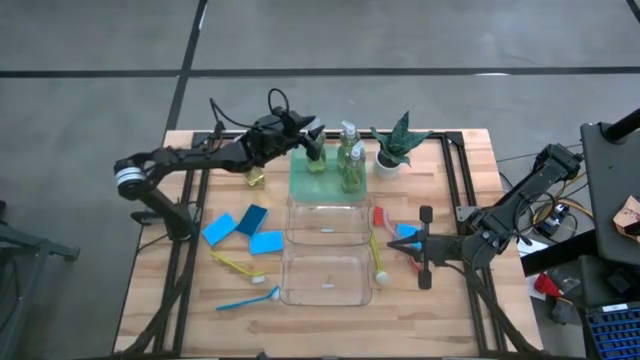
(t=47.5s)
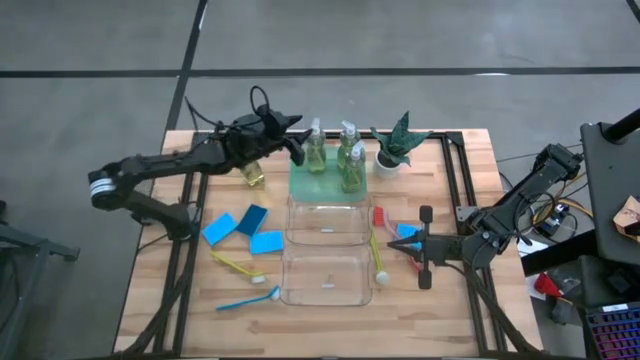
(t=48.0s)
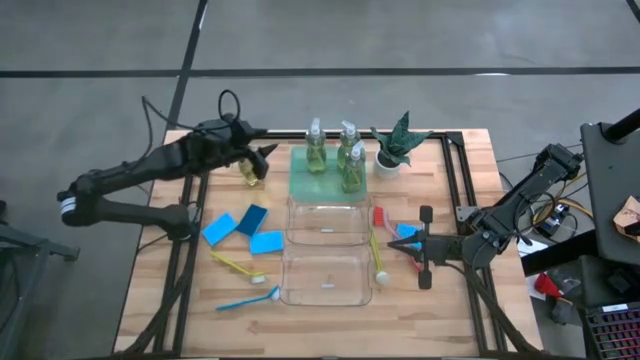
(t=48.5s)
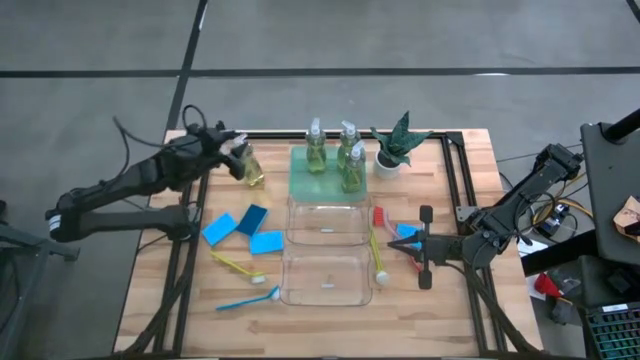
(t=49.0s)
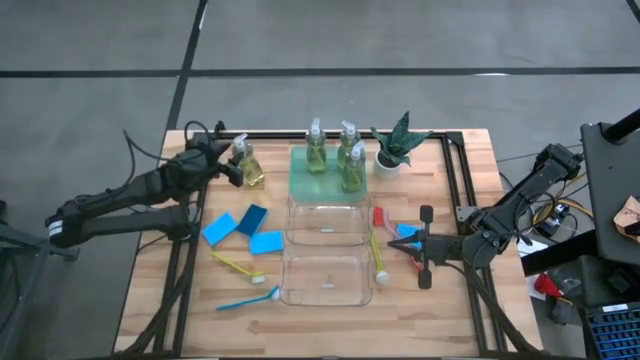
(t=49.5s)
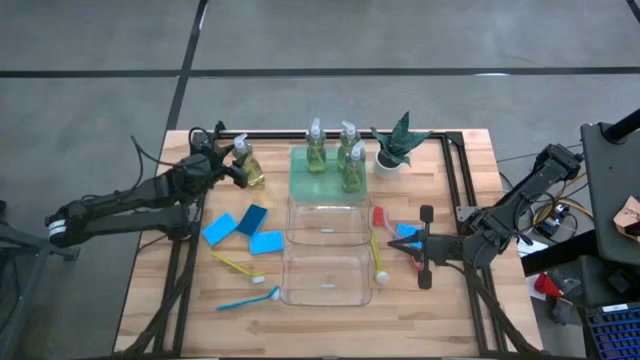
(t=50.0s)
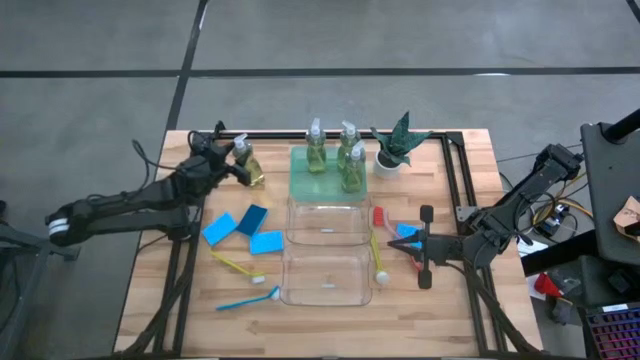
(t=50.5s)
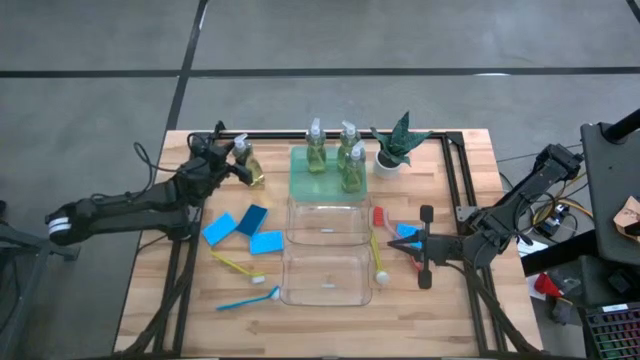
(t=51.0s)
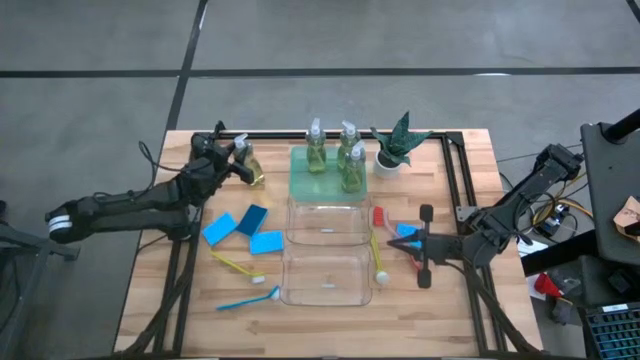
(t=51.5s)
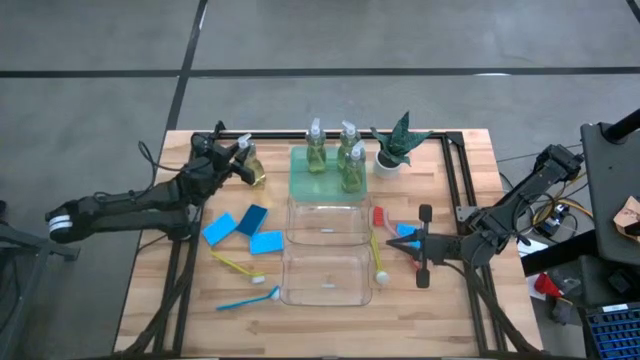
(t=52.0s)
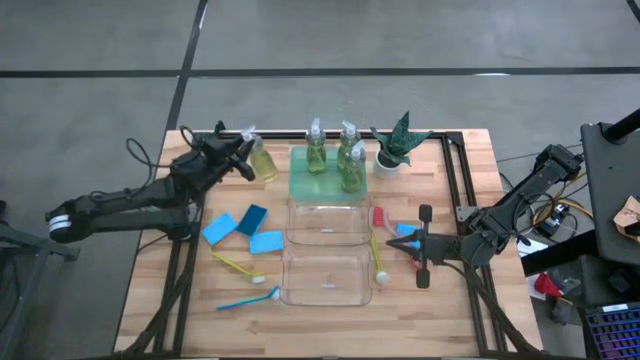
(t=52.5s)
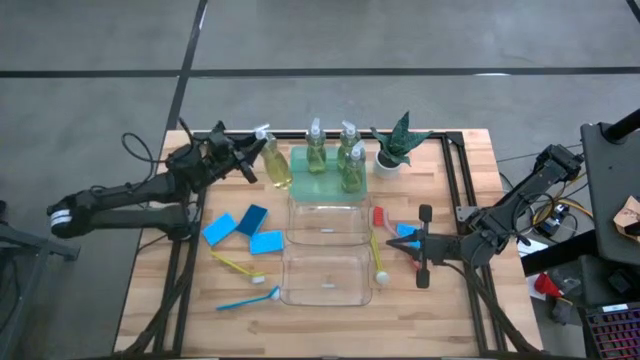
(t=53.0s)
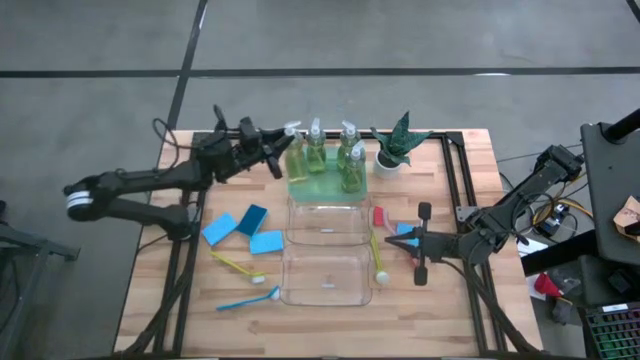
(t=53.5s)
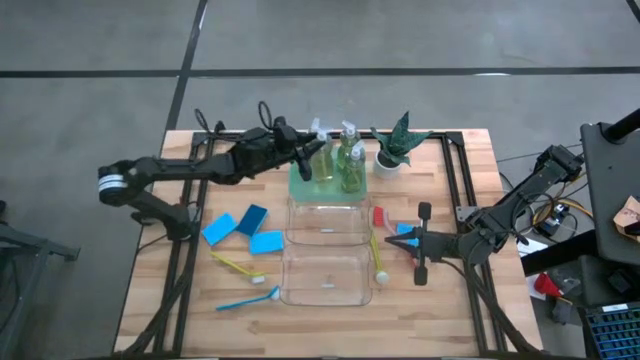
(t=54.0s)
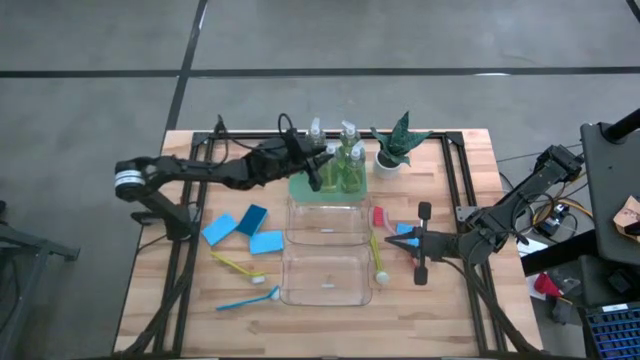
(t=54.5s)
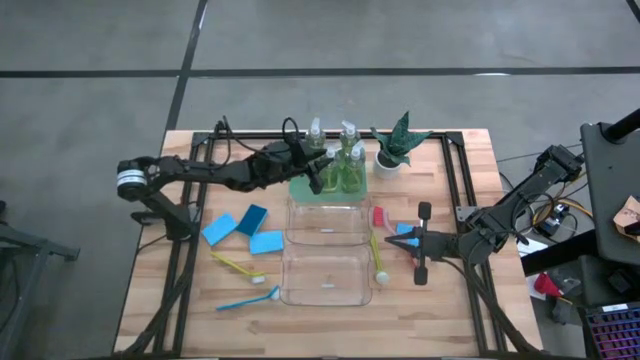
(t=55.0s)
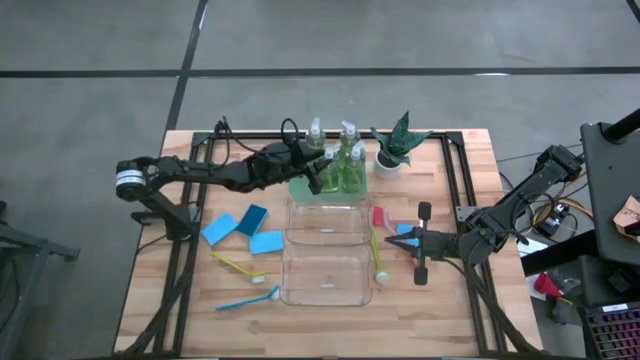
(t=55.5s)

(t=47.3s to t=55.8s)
Task: Pick & Place Kitchen Sink Supplies
Put the transparent soap dispenser into the blue bin

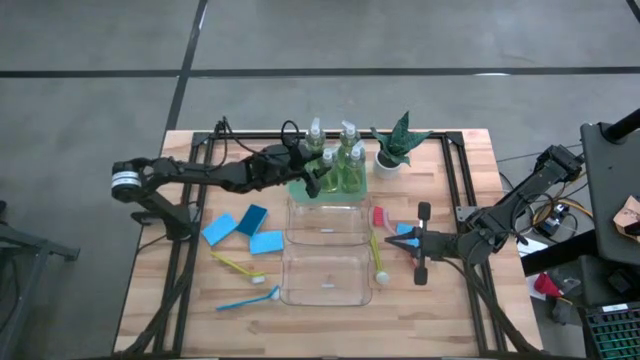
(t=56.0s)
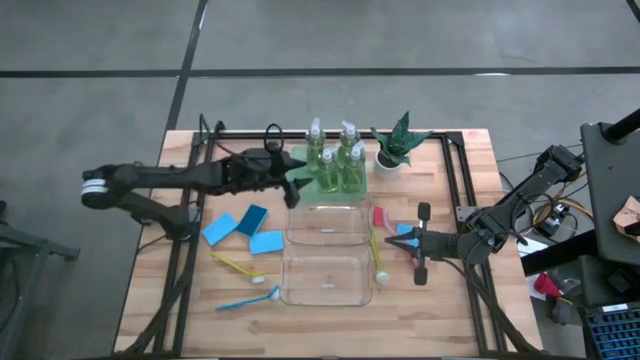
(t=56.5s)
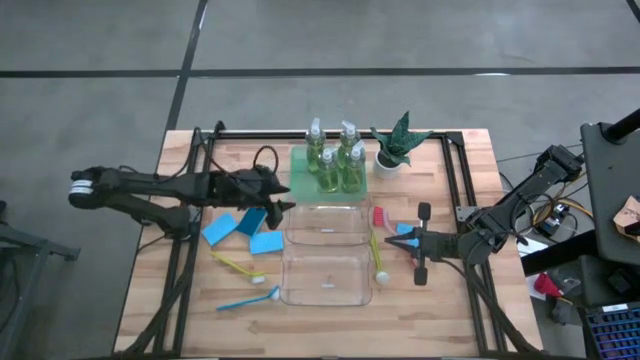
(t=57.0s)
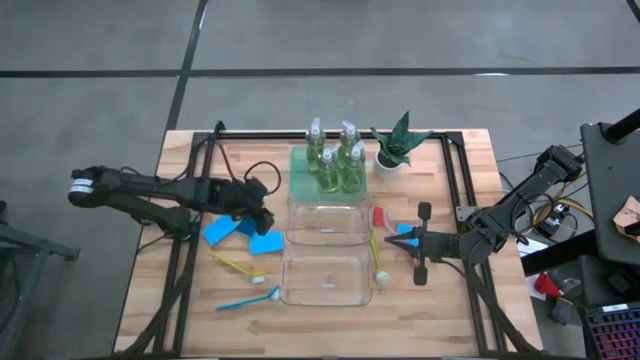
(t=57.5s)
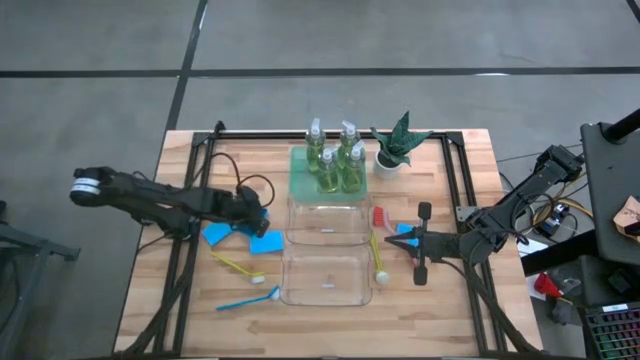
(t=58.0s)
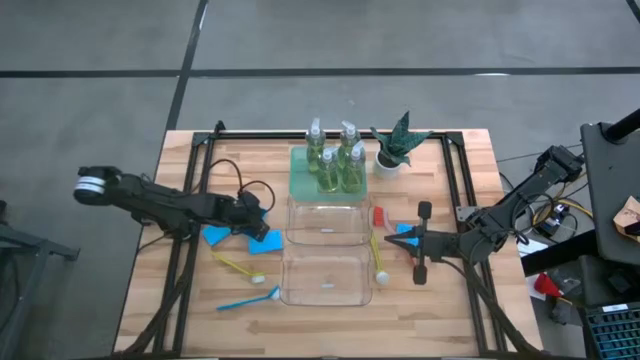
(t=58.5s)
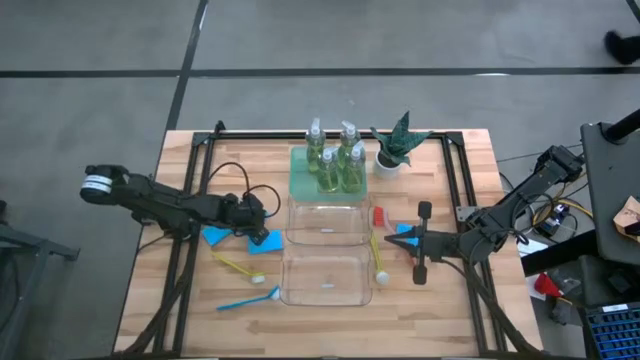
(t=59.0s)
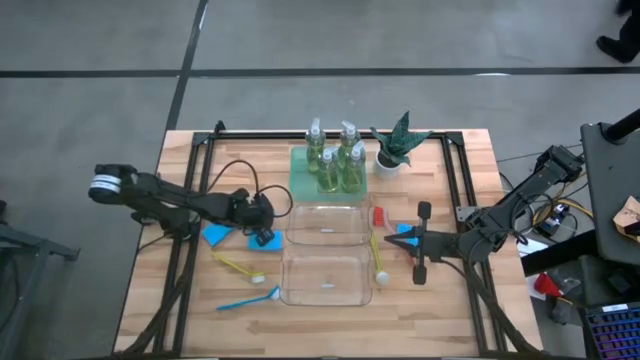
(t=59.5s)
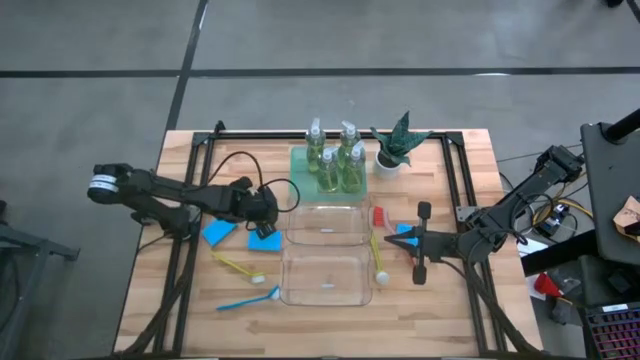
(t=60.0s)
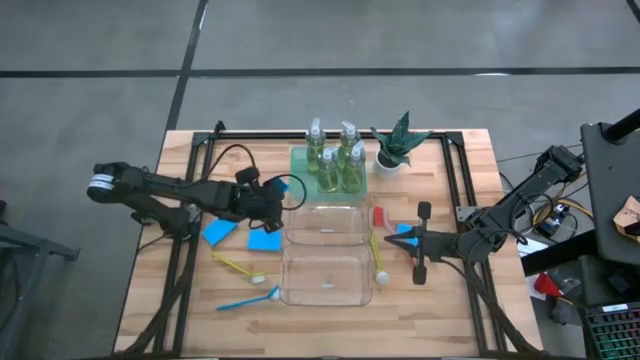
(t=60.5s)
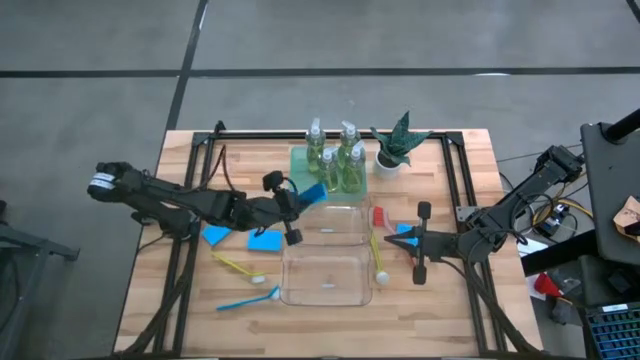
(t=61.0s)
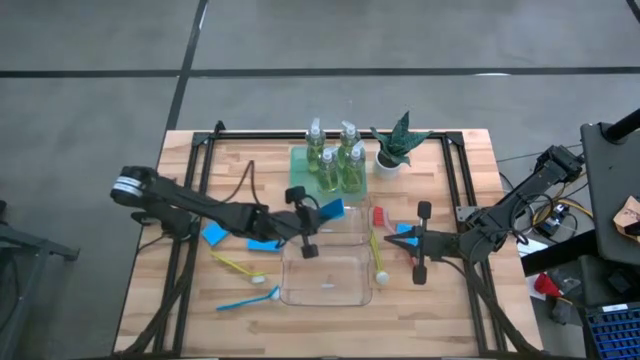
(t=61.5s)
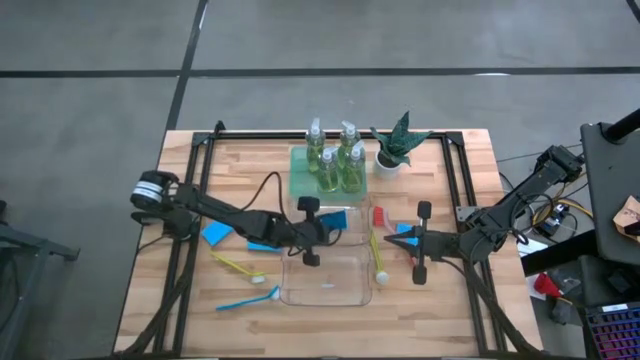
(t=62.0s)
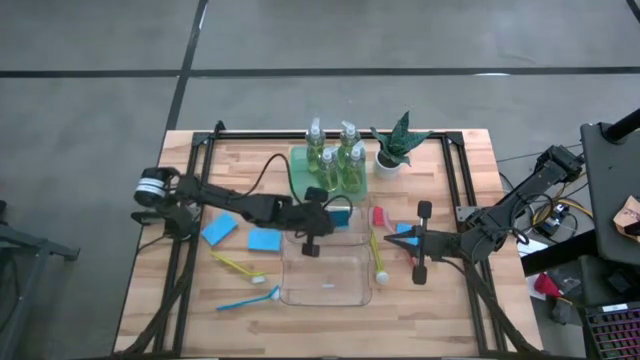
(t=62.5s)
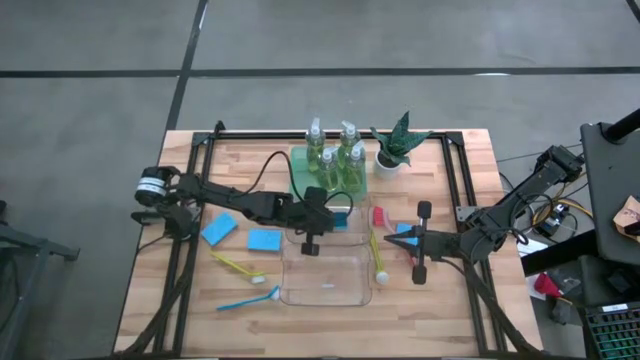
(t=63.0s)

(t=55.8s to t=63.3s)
Put the blue sponge into the top transparent bin

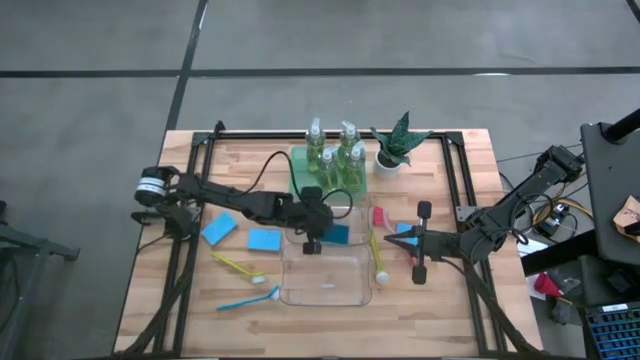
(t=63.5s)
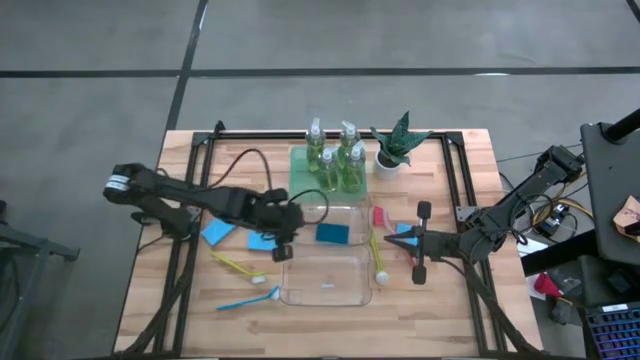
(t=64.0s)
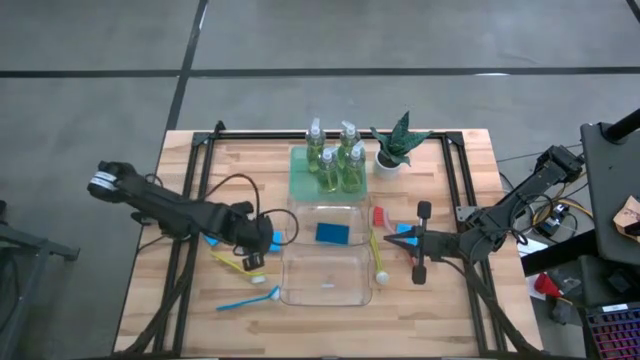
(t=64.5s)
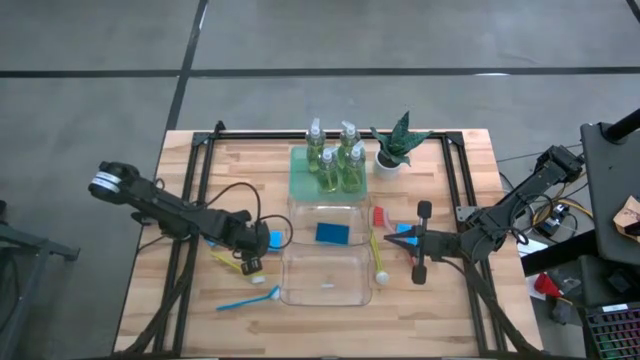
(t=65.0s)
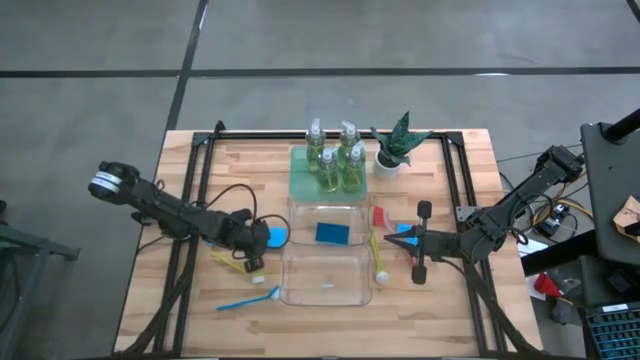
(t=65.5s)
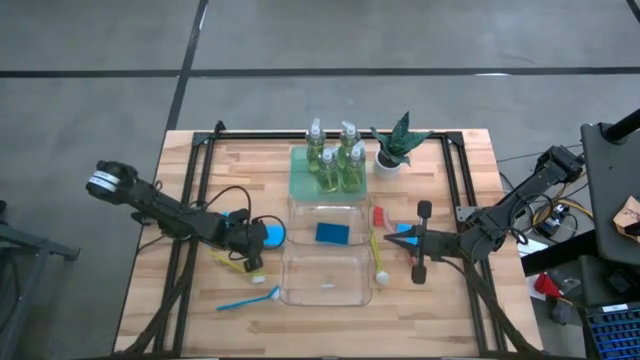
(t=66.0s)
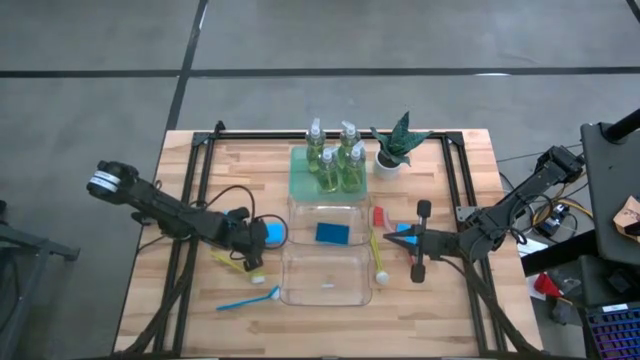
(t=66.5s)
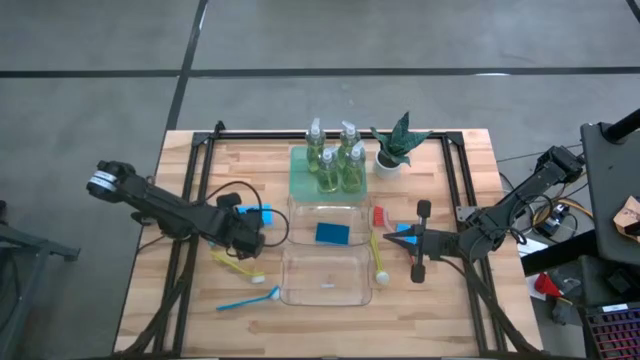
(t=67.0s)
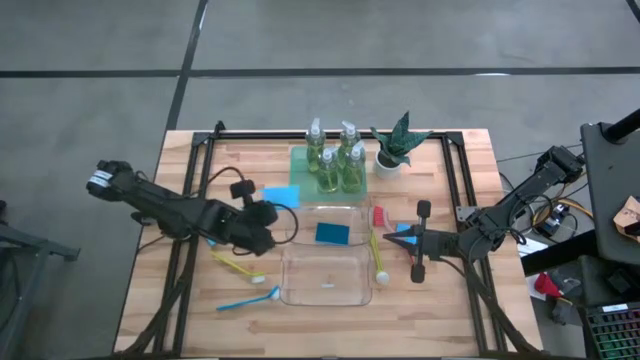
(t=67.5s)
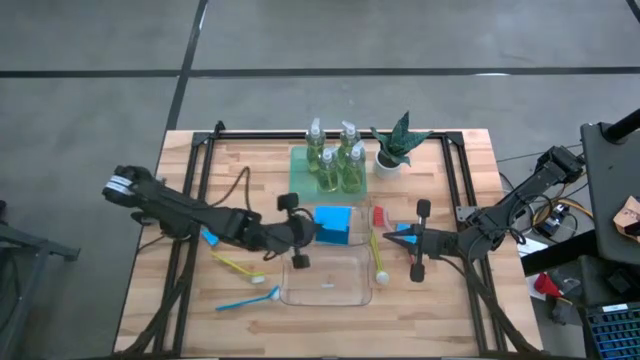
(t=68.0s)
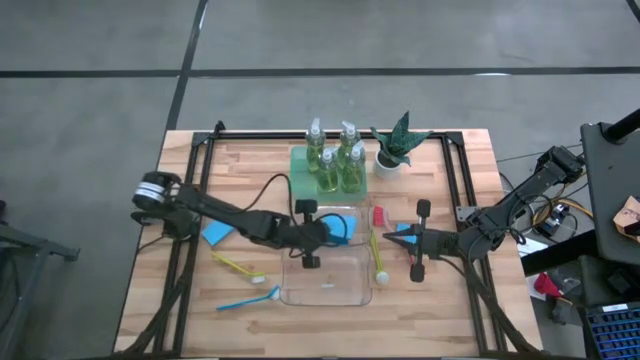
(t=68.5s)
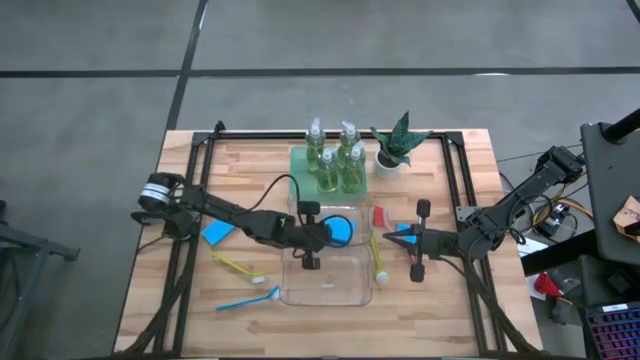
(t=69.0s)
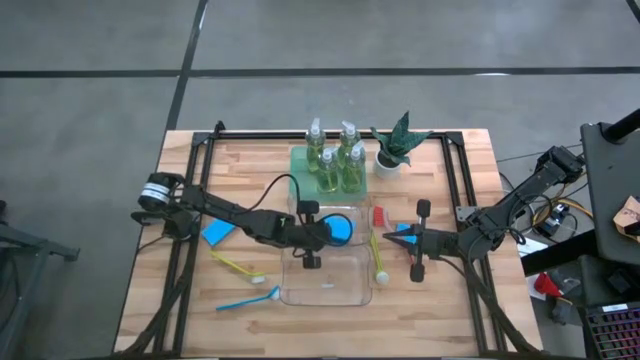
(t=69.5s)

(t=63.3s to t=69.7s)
Put the blue sponge into the top transparent bin
